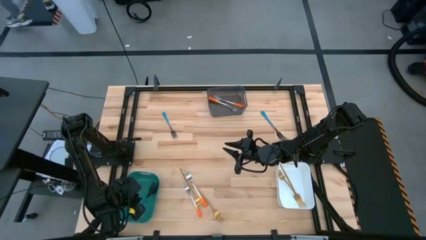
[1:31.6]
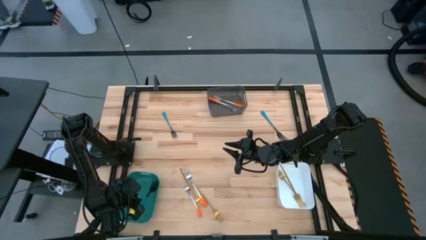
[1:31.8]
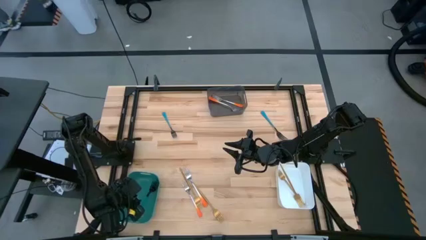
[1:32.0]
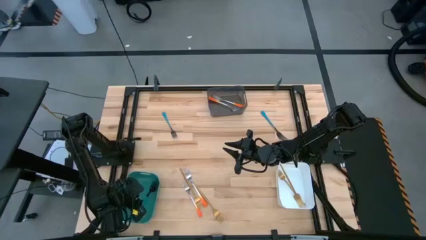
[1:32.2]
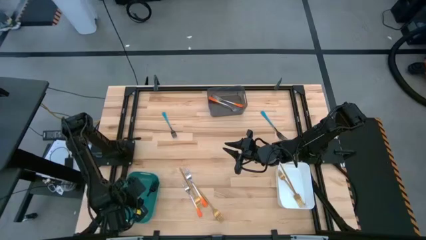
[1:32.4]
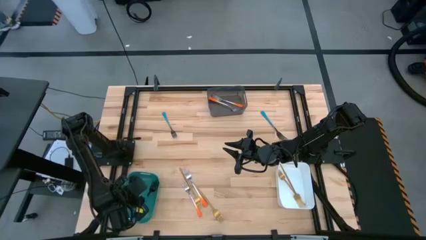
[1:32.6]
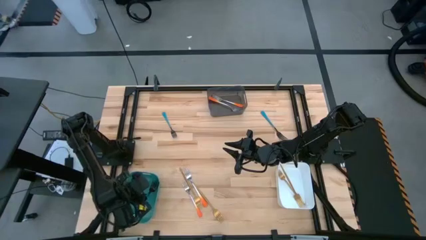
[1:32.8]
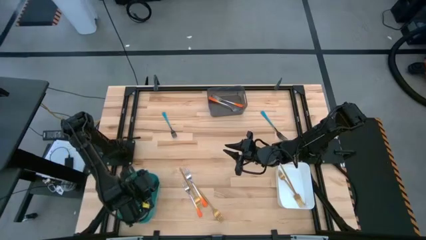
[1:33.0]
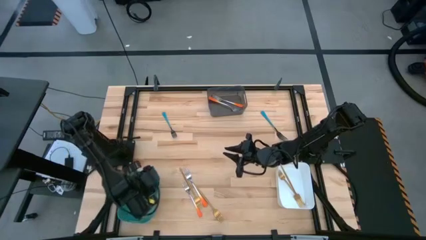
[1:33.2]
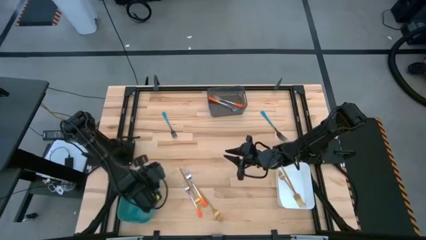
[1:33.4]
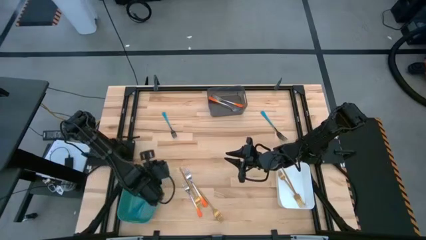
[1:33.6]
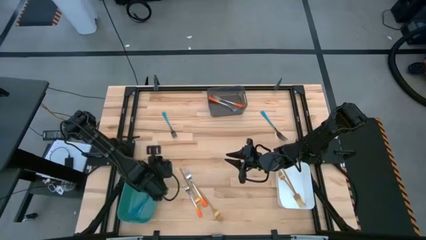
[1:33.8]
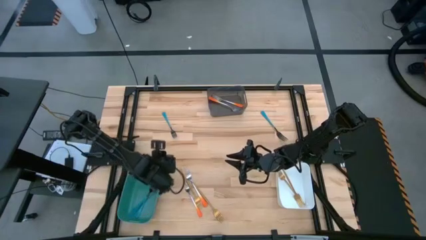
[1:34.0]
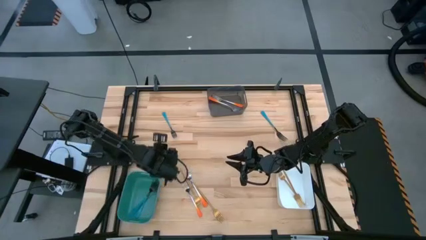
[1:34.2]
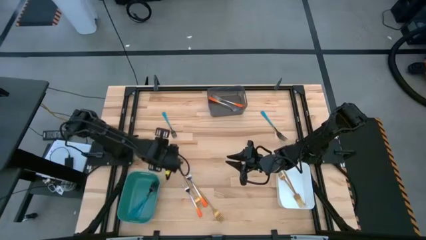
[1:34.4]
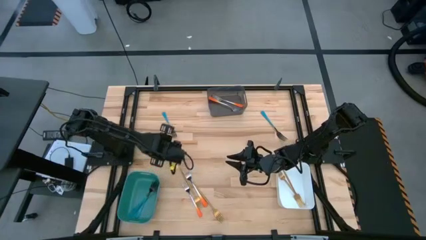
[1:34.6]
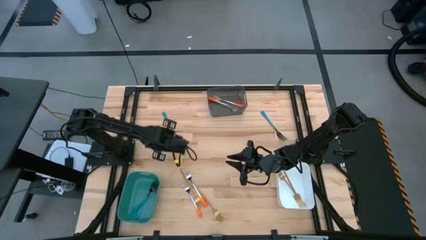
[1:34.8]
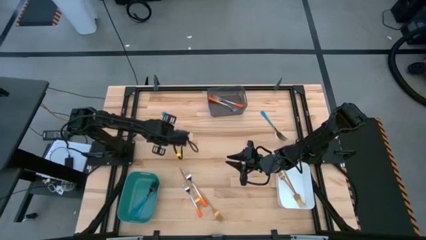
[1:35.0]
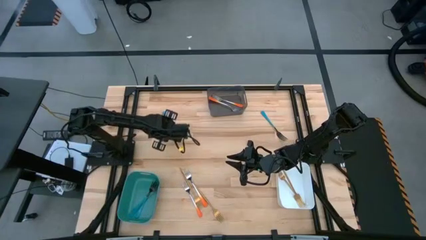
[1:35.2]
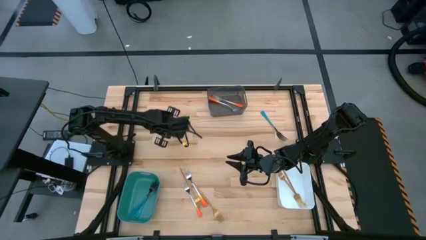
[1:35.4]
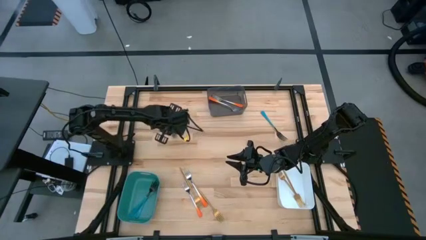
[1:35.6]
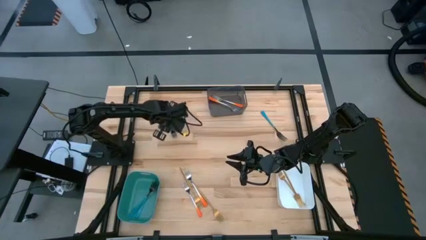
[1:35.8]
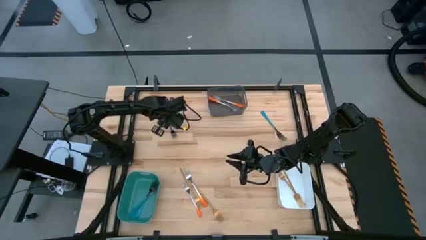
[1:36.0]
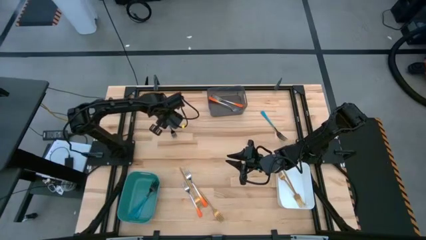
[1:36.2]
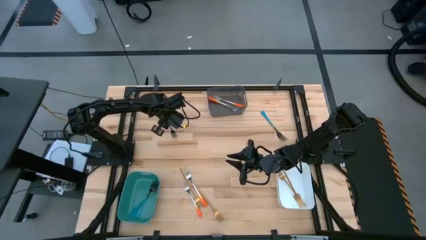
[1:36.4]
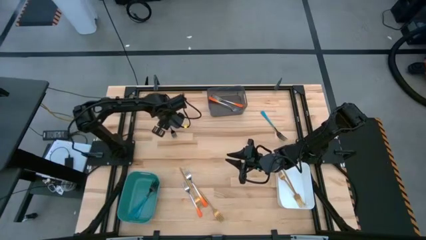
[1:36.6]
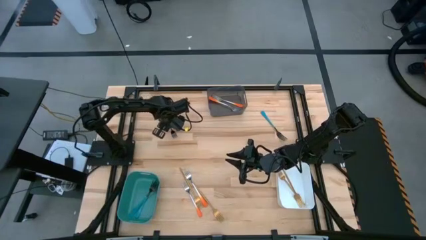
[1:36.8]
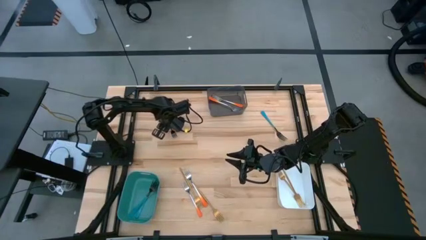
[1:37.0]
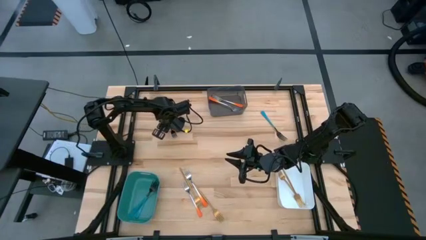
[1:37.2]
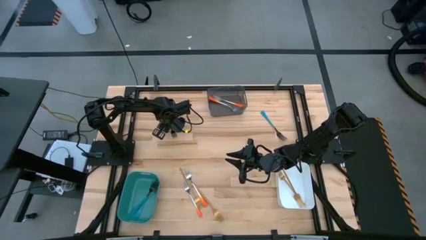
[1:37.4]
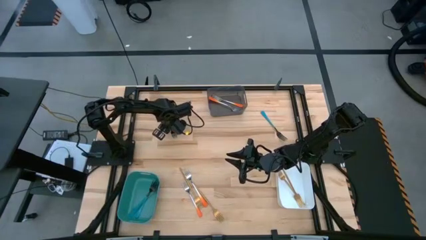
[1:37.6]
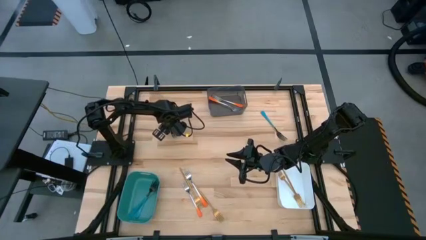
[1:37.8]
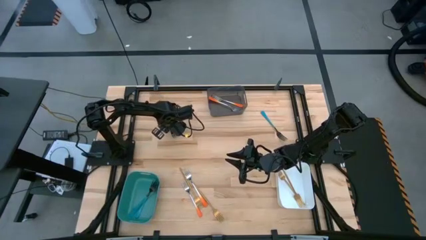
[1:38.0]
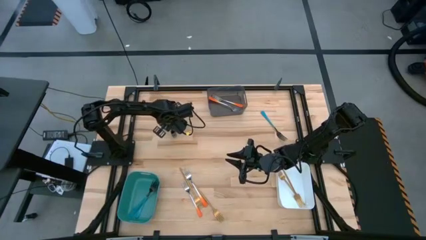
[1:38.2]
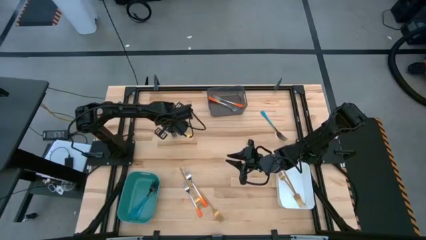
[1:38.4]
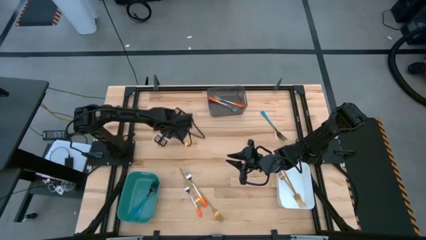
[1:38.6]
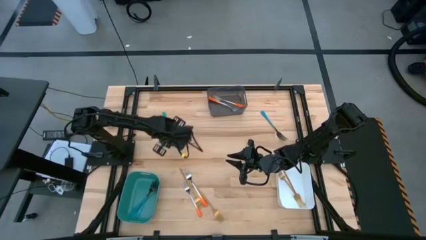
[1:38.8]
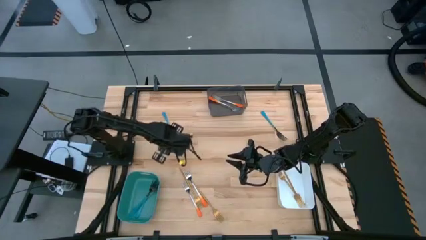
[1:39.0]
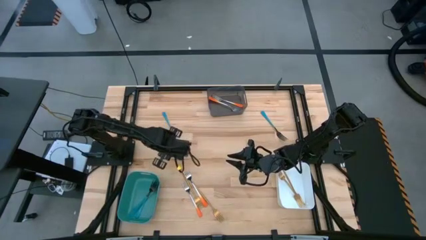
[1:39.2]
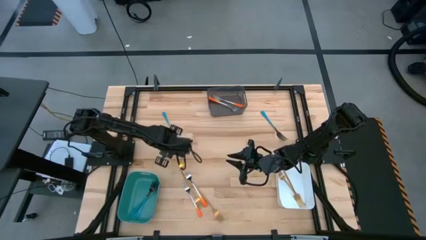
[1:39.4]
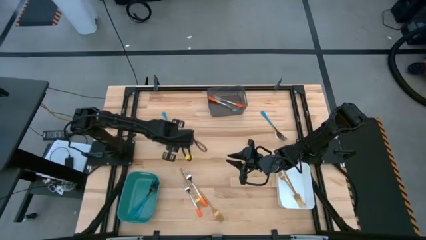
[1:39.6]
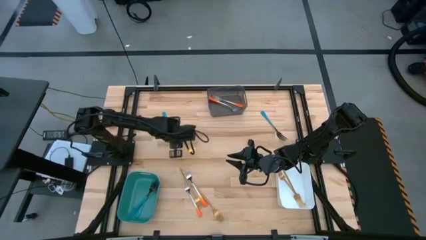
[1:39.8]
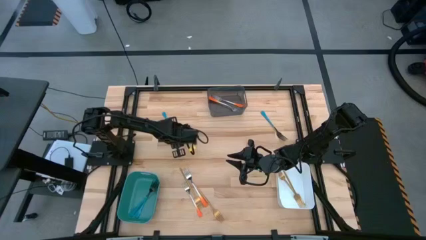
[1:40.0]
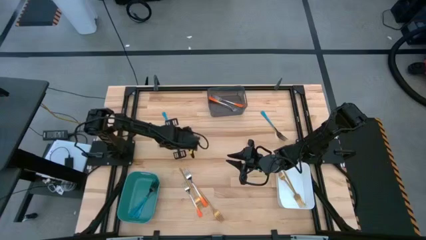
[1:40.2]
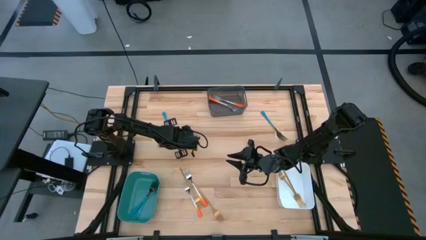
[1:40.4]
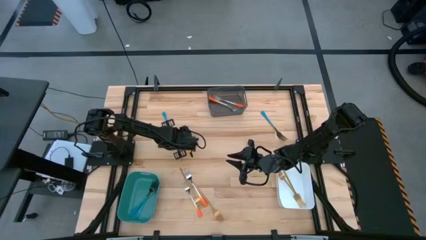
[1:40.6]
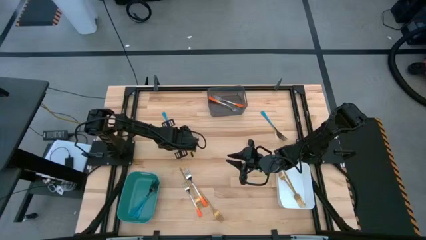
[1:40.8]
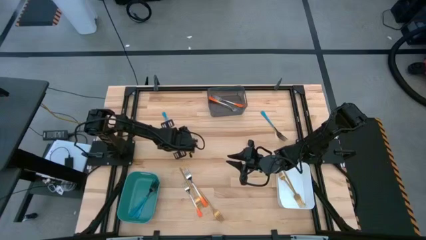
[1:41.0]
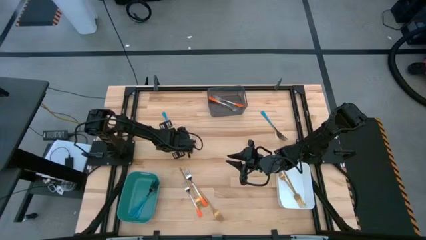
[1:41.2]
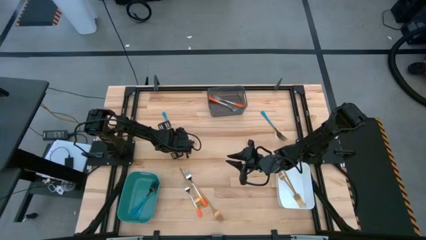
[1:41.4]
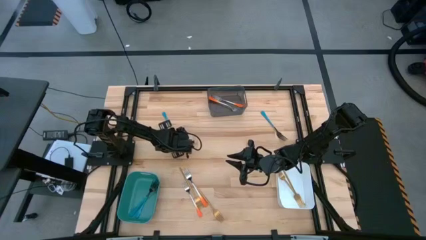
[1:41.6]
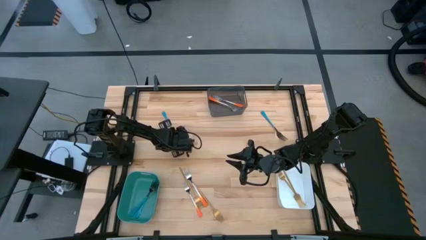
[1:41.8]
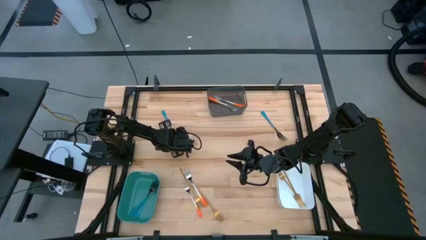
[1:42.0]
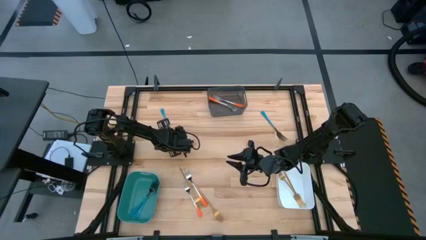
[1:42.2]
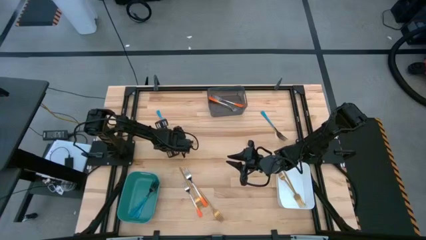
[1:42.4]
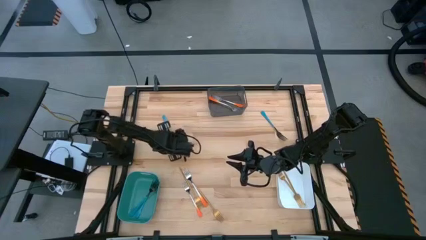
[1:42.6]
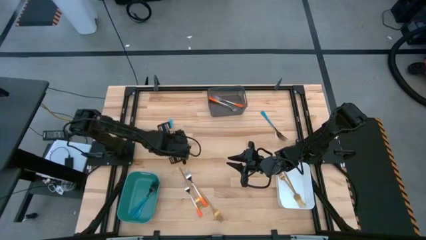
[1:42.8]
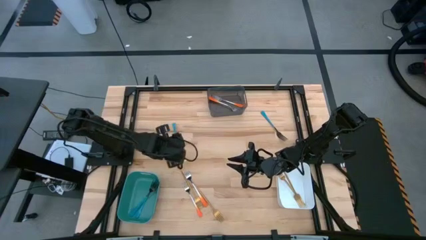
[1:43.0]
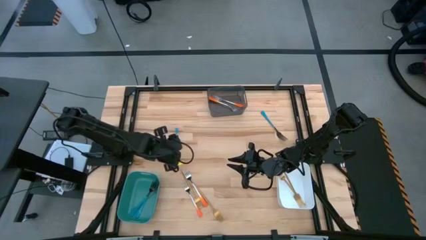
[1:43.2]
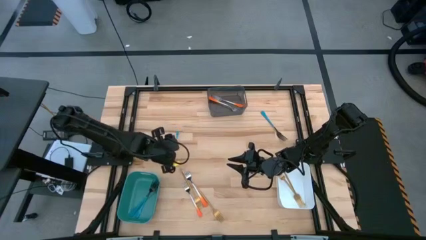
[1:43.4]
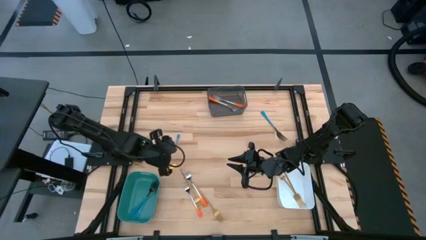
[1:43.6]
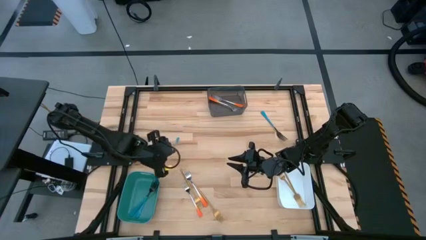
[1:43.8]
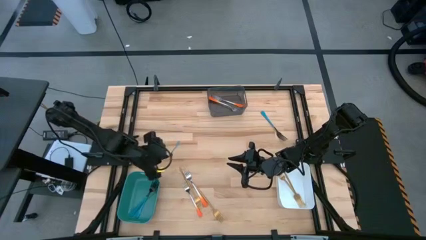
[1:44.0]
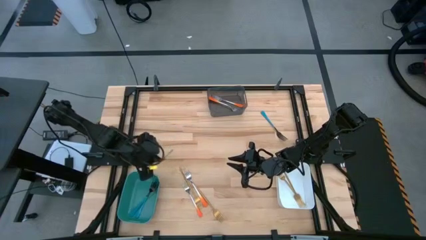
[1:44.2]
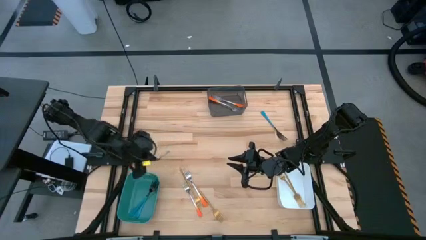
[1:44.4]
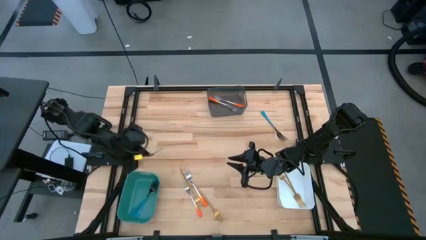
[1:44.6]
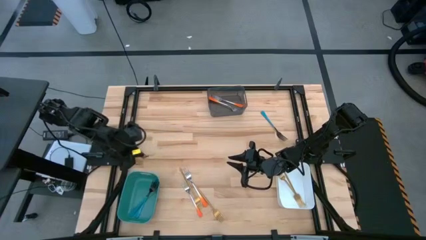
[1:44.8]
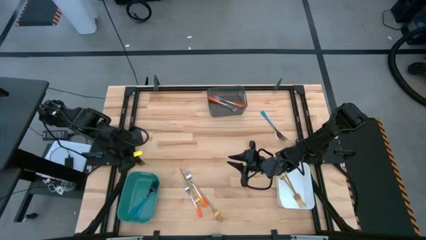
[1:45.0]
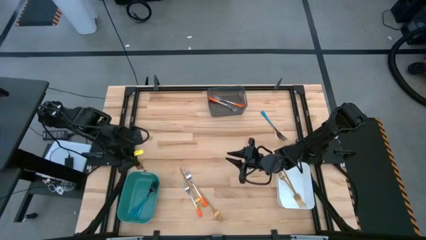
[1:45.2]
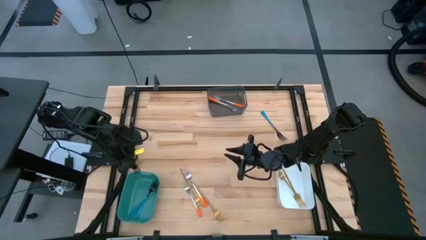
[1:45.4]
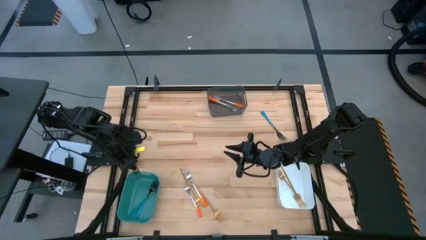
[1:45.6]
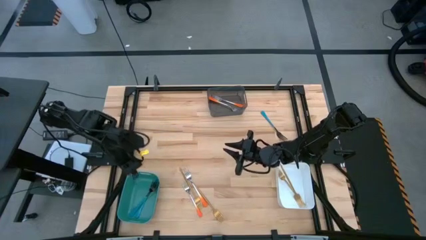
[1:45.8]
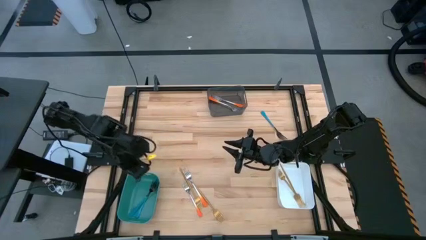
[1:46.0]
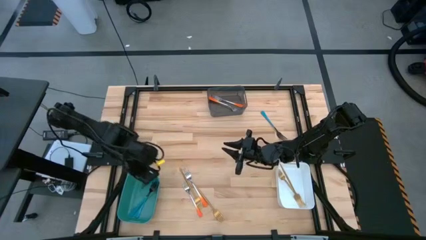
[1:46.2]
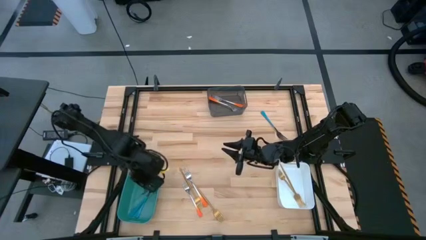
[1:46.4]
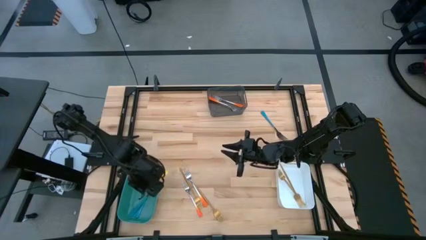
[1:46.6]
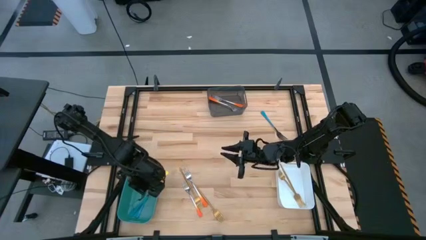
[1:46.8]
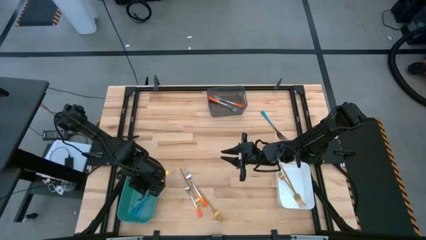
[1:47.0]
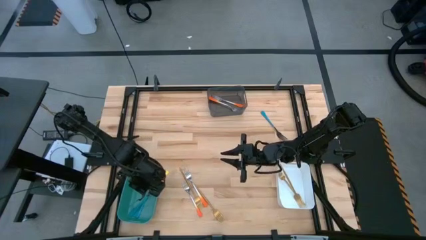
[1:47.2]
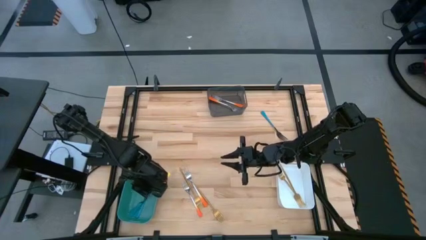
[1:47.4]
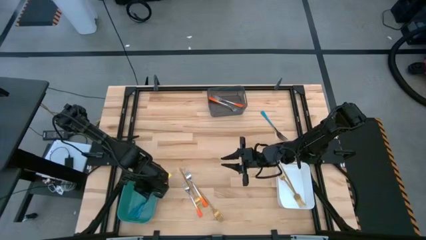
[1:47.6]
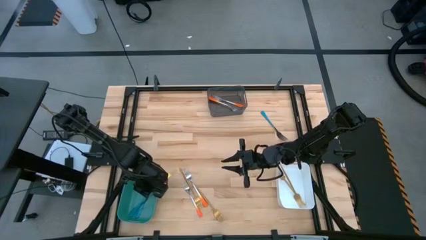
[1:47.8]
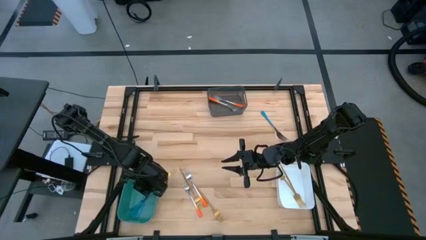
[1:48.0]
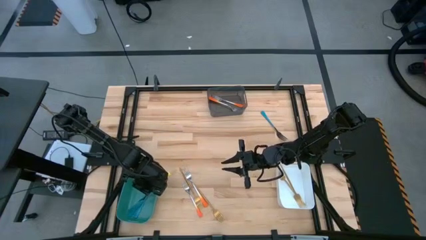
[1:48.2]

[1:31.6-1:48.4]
Task: Sort silverware by color (type)
Put the blue fork into the green bin
